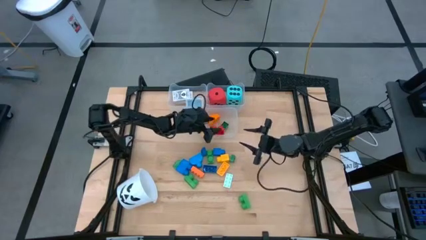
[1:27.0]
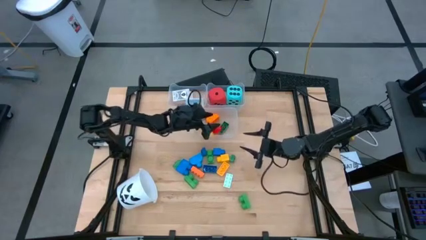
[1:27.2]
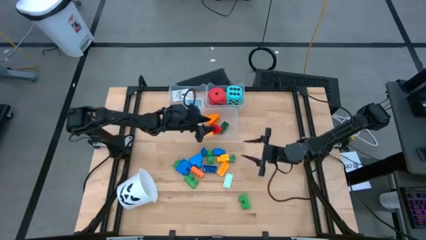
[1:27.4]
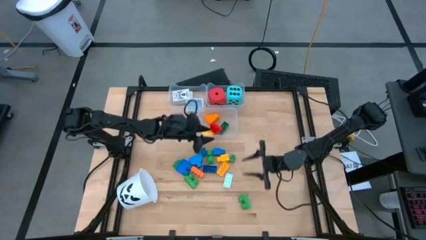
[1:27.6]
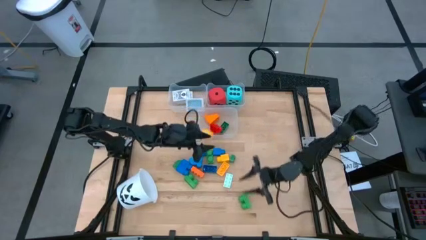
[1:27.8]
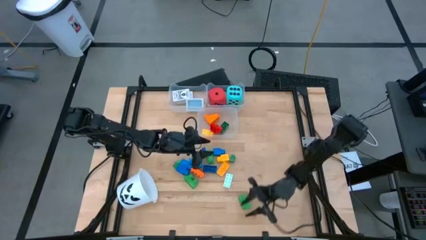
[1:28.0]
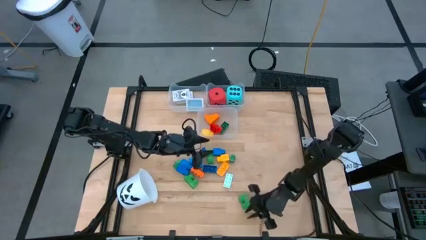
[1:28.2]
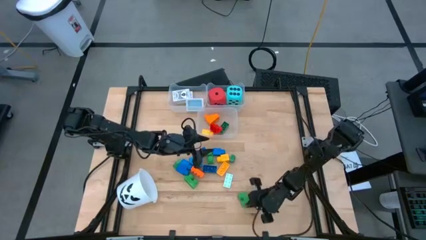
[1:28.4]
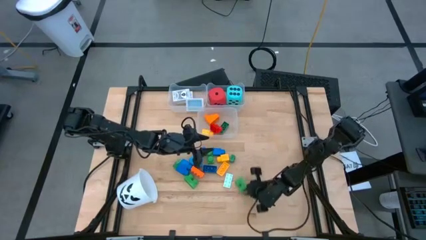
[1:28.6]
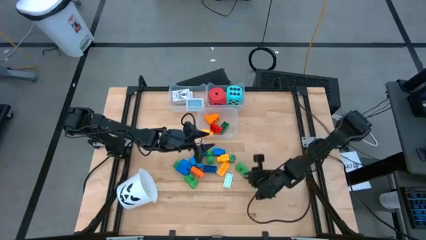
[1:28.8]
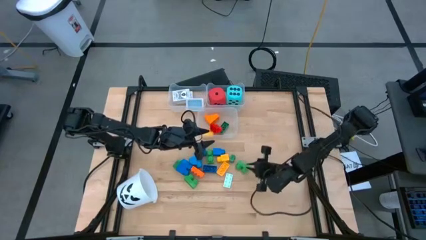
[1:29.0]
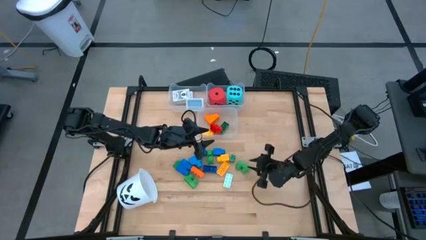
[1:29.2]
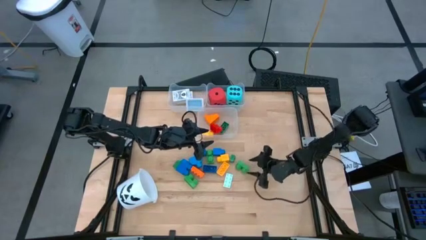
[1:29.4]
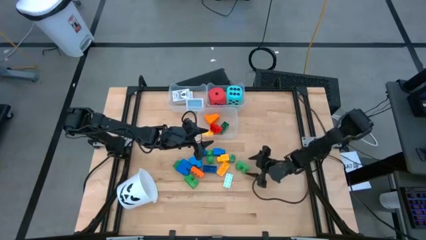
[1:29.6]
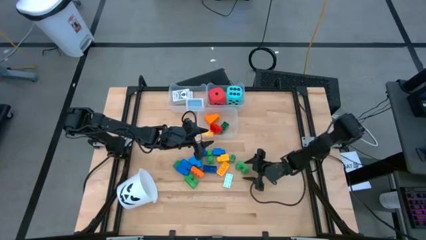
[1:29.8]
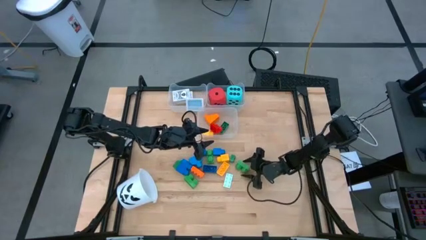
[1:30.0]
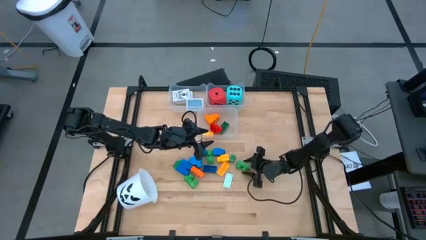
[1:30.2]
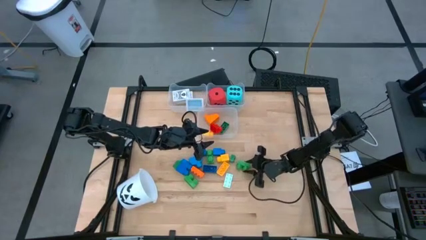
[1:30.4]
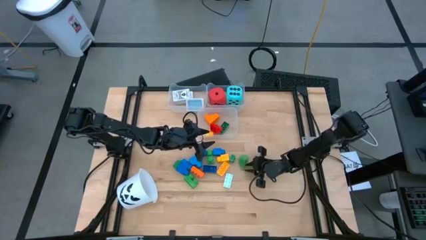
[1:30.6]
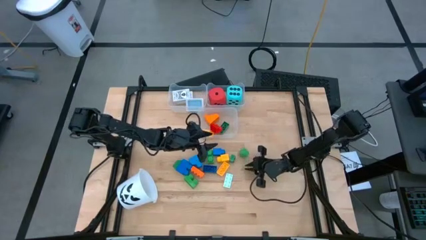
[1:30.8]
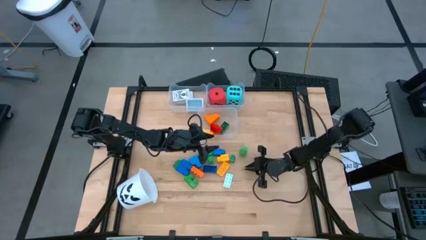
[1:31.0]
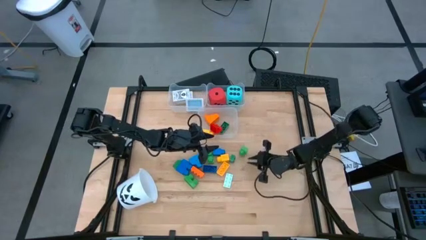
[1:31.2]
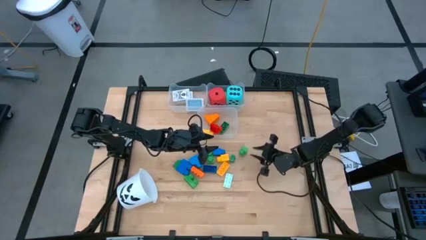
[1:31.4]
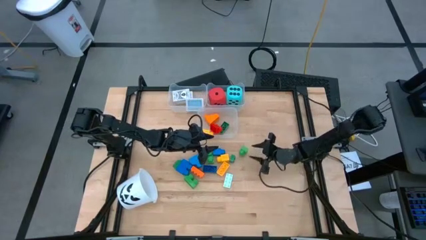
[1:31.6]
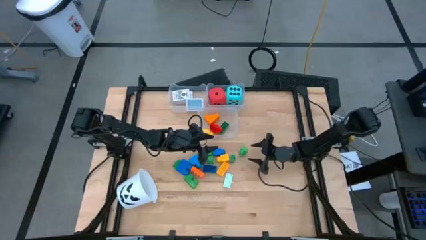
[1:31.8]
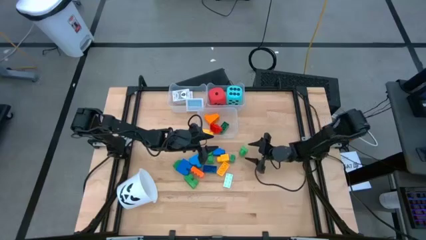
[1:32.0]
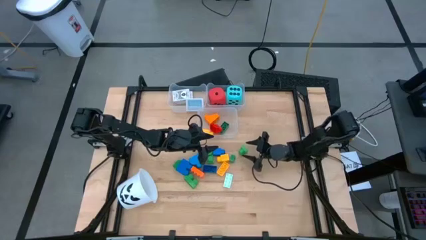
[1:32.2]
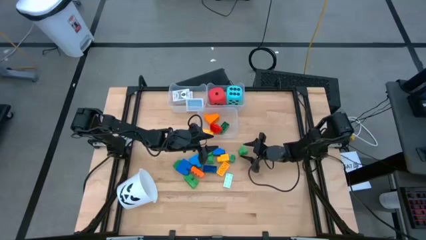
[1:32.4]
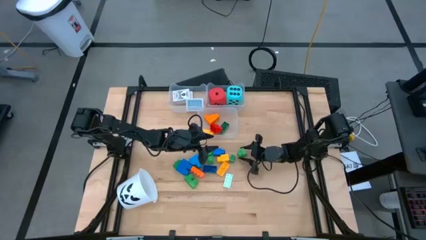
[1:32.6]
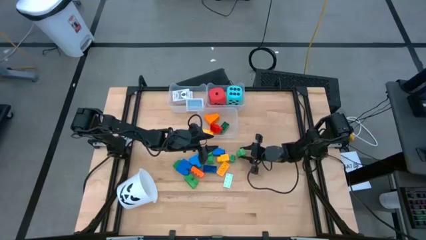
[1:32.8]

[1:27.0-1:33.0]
Task: Pick & Place Toys
Put the green game piece into the bottom transparent bin

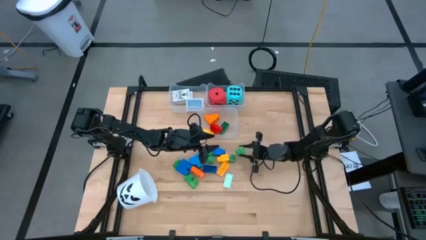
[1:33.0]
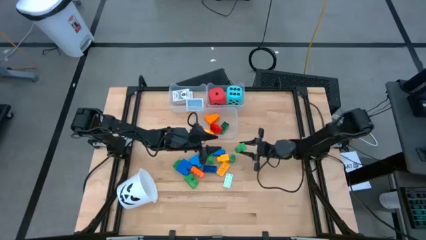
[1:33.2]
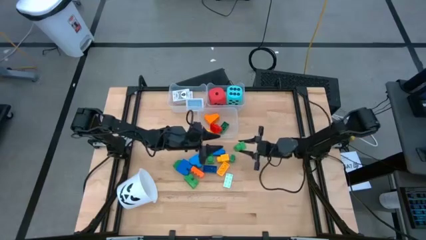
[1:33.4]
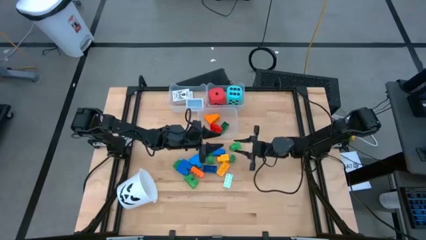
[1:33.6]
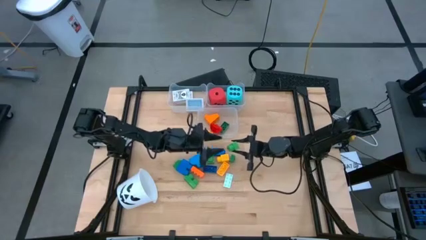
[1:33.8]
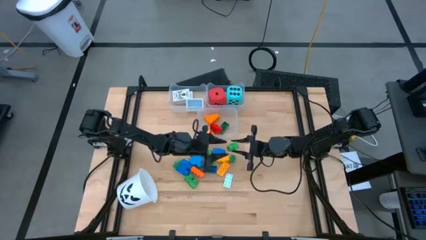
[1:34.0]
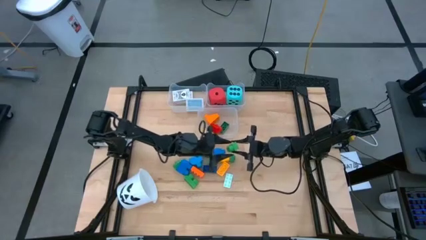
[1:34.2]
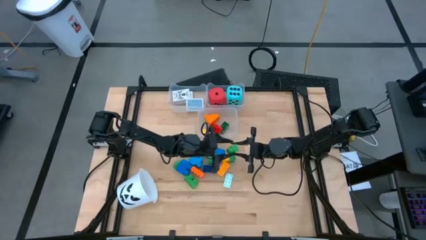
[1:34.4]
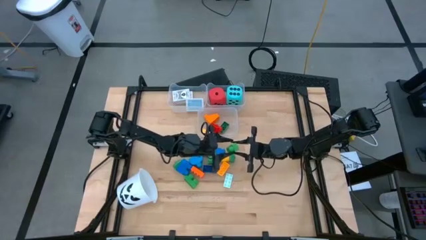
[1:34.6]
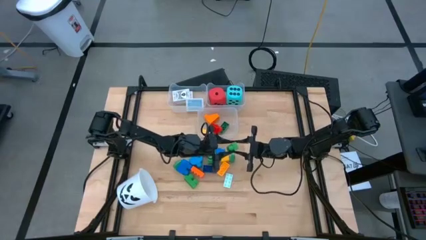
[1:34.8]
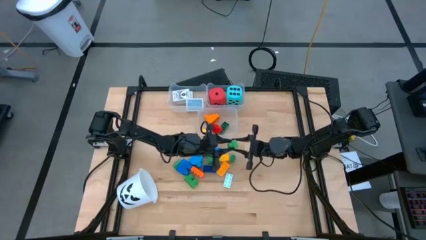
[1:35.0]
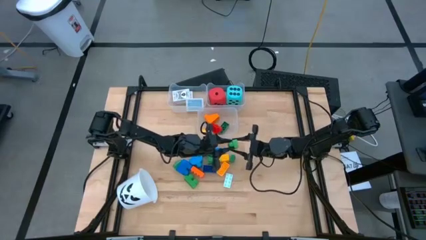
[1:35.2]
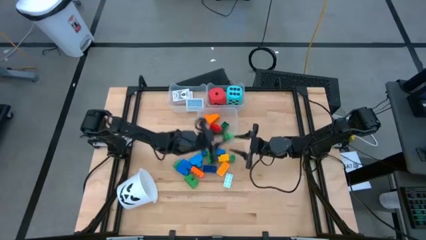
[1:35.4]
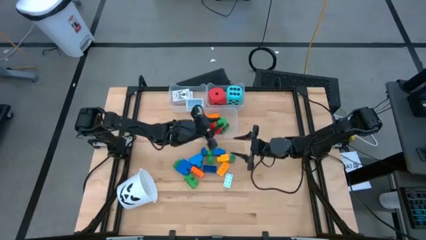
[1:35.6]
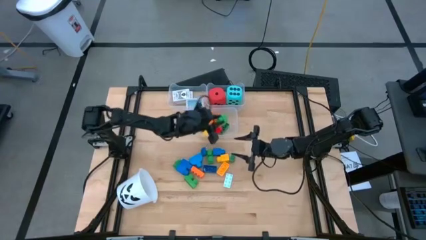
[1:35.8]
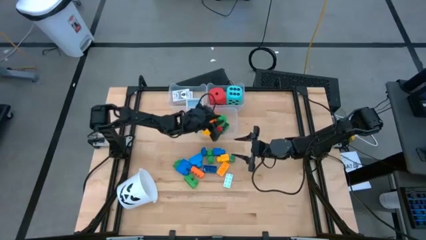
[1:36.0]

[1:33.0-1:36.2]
Put the green game piece into the bottom transparent bin

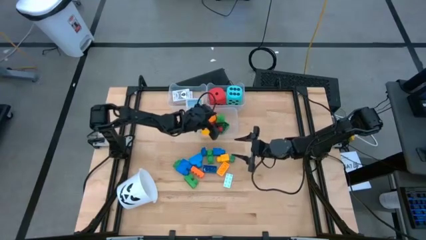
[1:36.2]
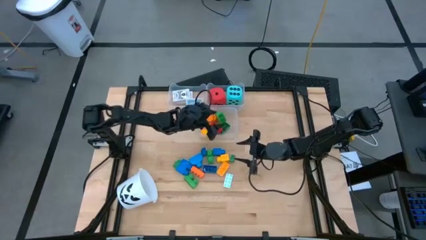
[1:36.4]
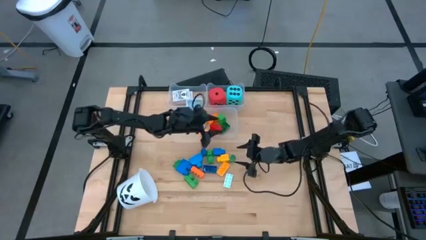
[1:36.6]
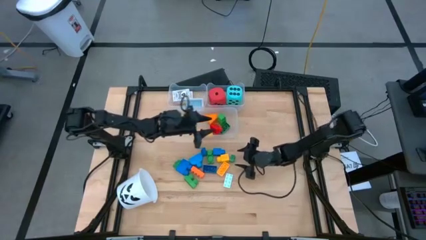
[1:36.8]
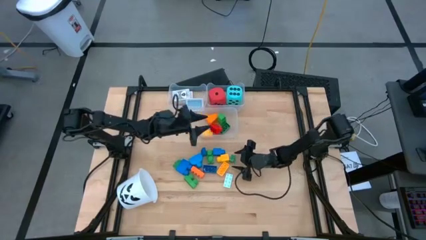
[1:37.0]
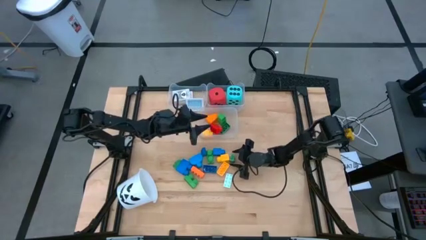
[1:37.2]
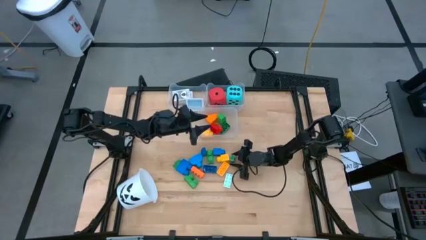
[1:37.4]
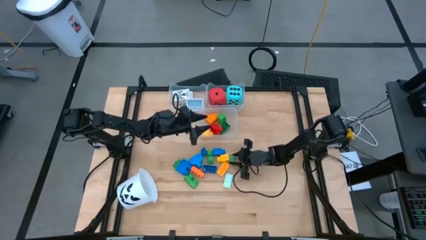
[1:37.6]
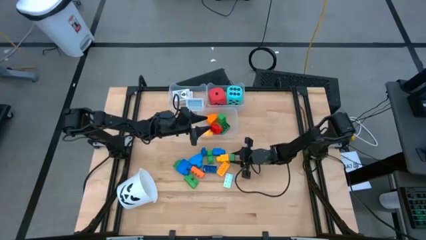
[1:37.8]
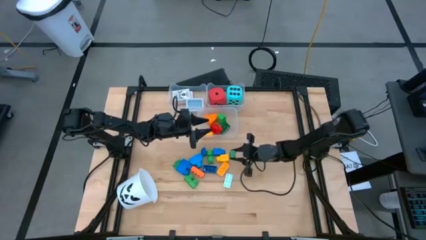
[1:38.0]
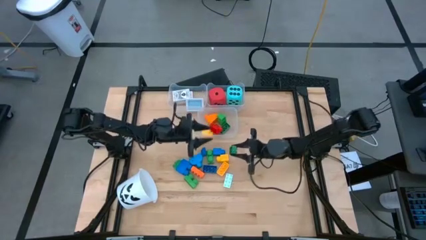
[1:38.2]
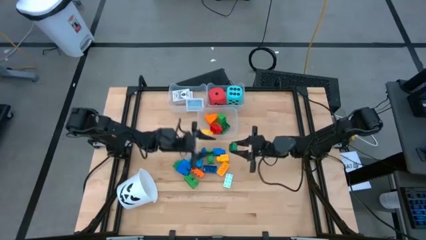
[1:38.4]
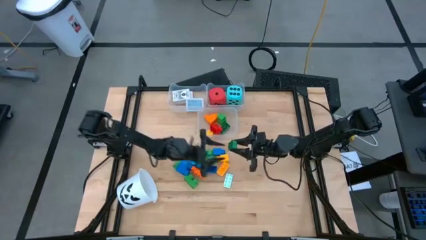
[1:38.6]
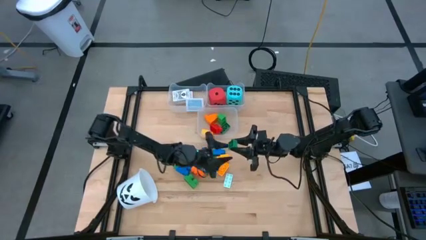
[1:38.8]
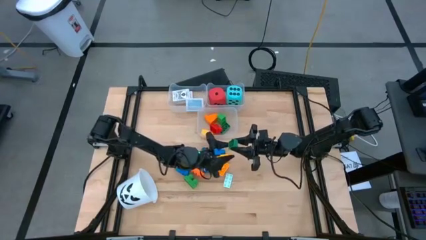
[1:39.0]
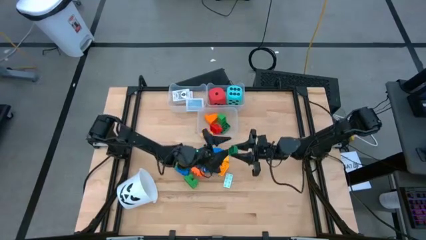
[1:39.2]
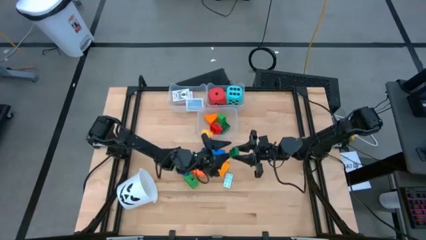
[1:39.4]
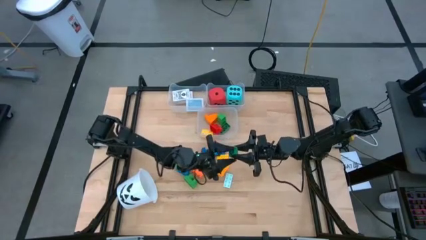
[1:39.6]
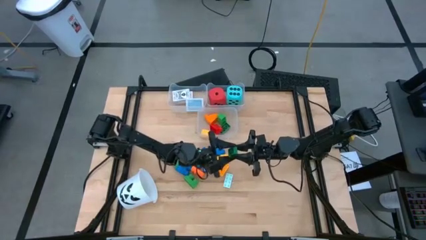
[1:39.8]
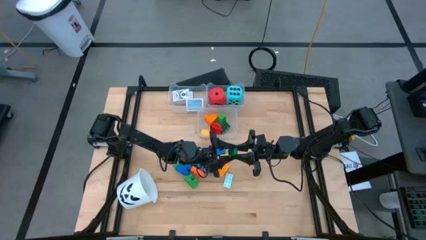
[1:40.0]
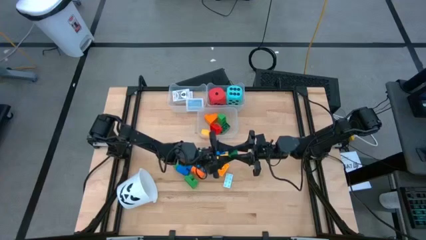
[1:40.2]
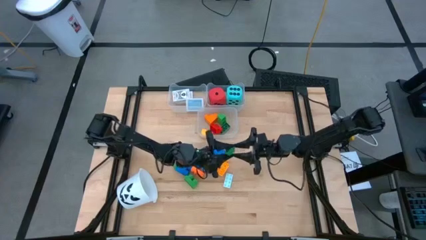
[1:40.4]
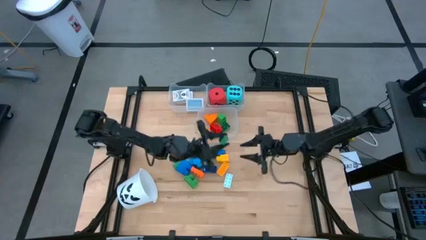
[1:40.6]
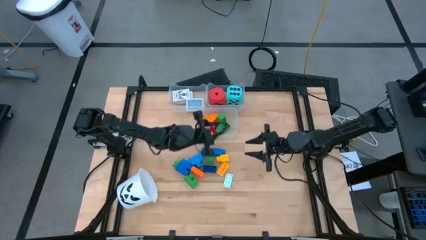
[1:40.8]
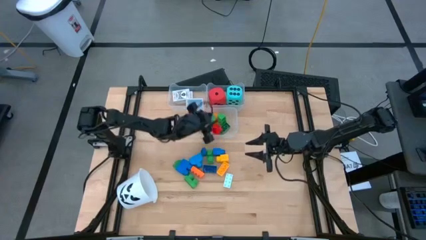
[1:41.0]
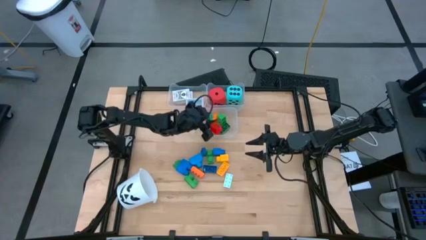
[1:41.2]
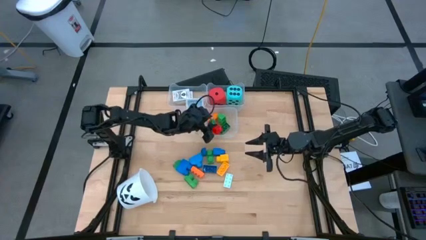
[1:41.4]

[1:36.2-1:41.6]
Put the green game piece into the bottom transparent bin
